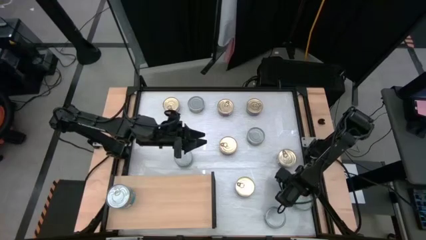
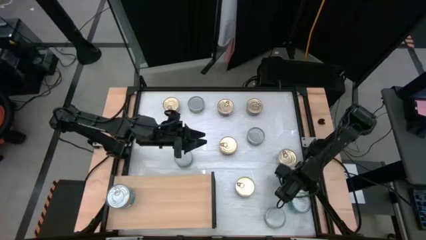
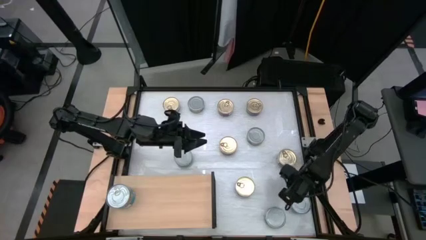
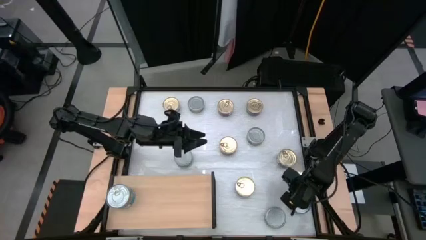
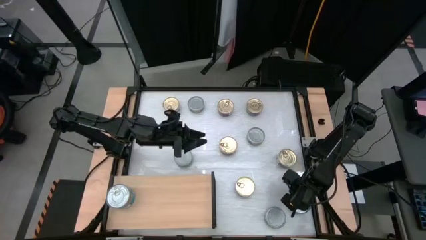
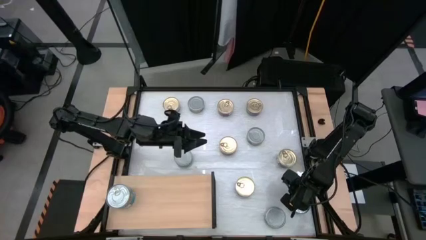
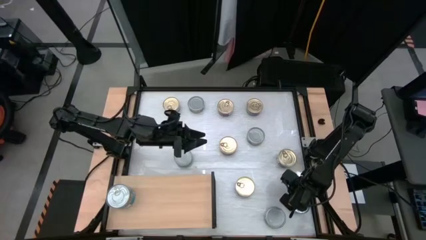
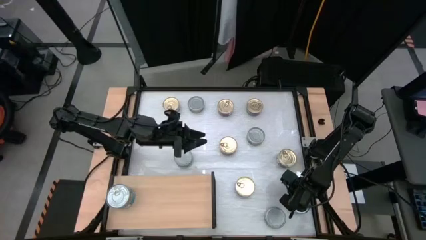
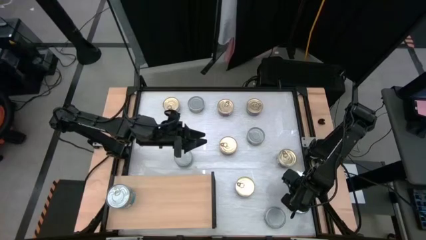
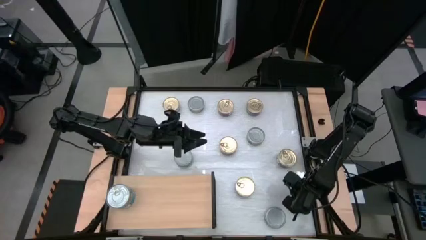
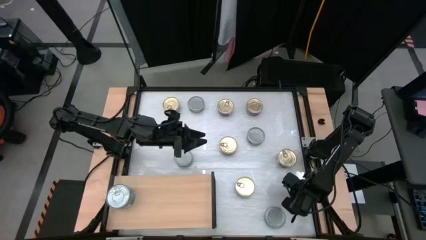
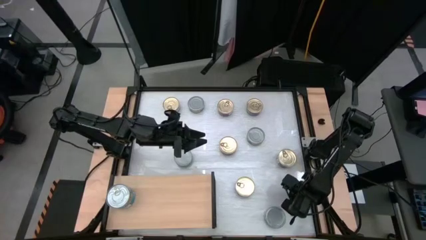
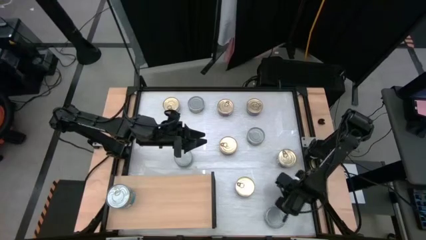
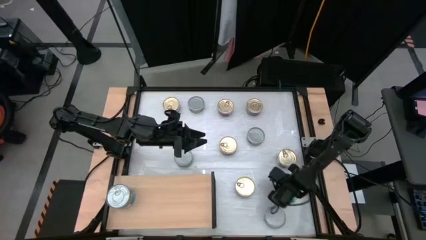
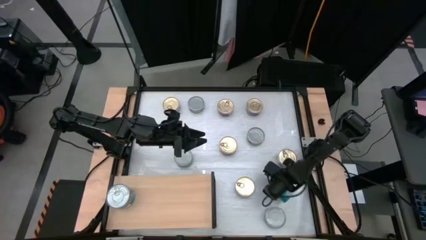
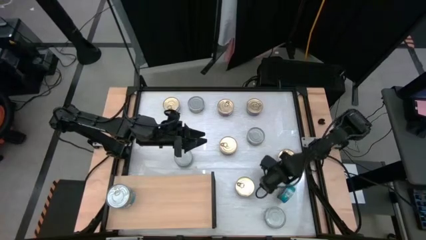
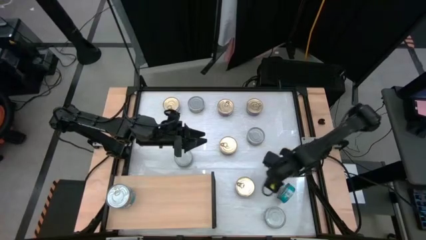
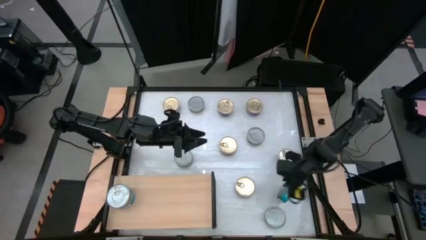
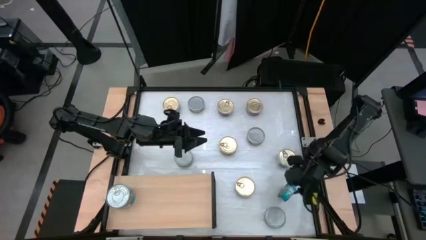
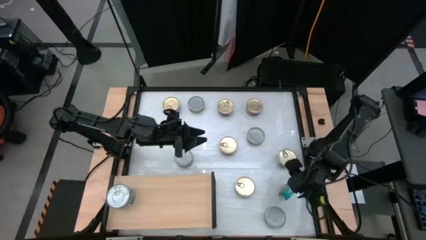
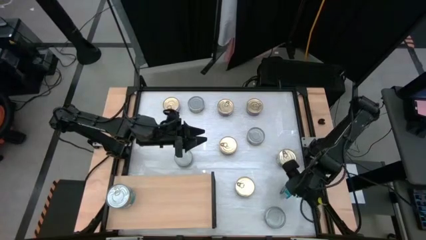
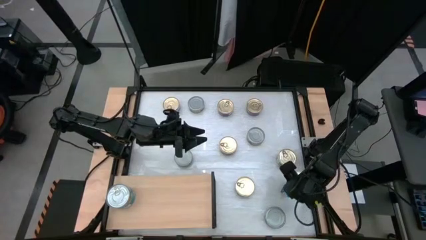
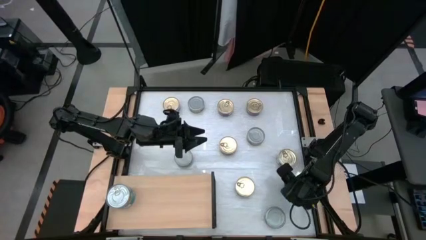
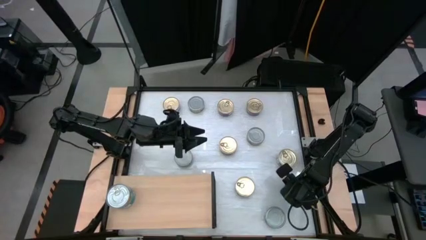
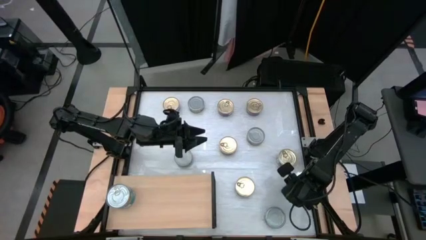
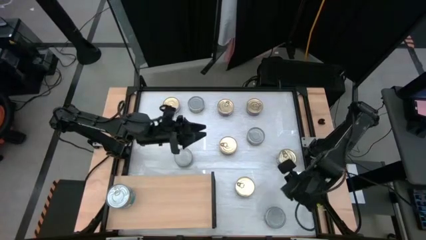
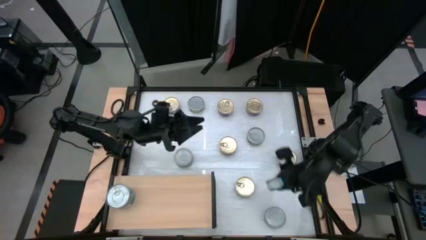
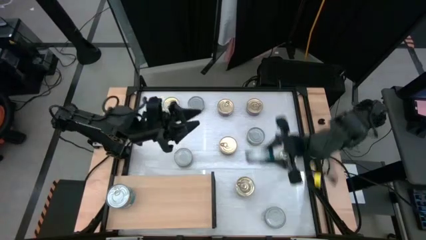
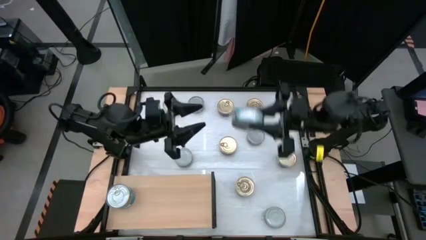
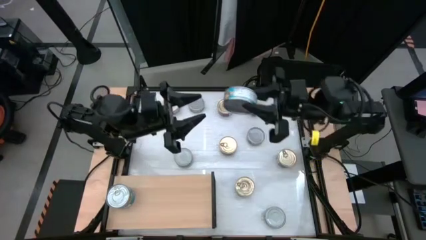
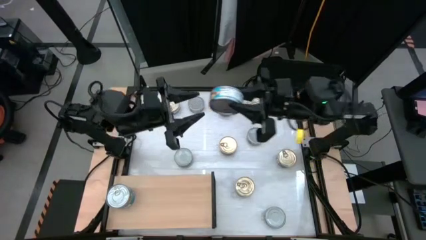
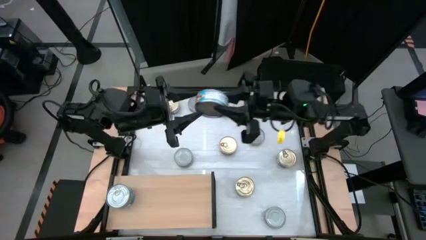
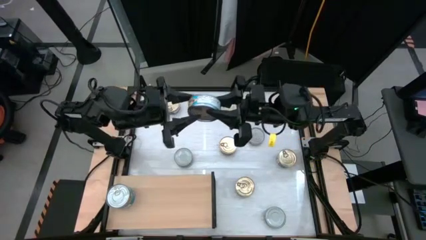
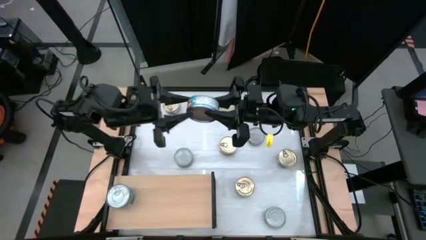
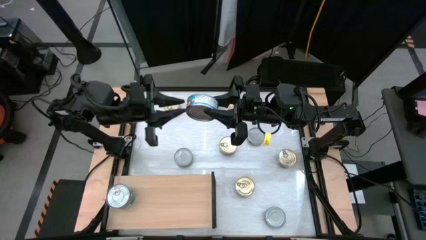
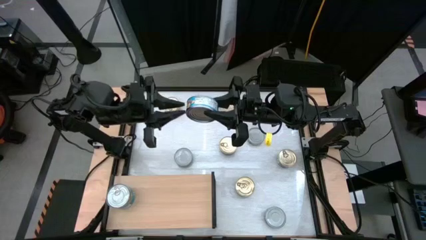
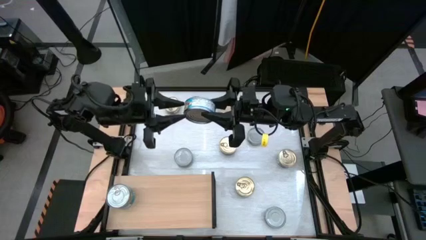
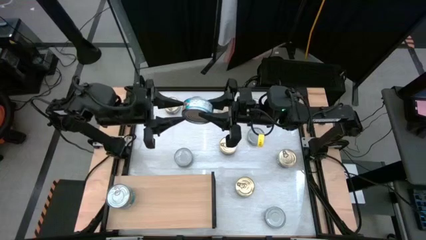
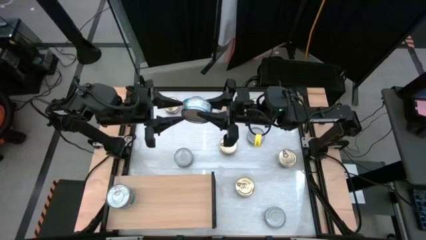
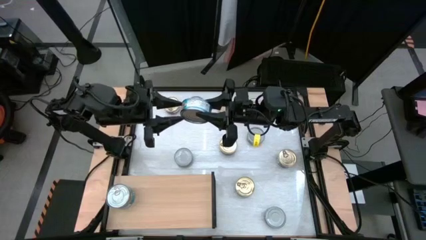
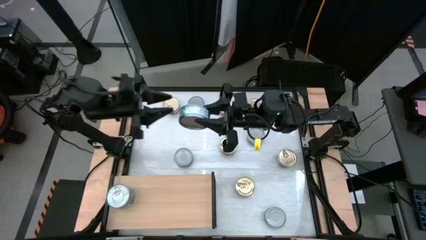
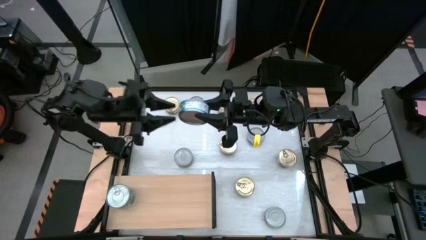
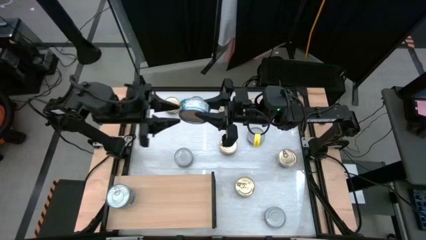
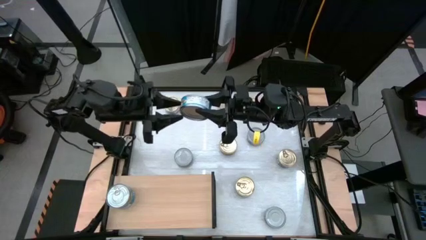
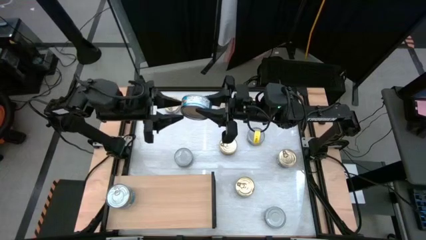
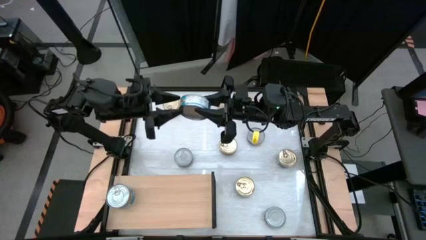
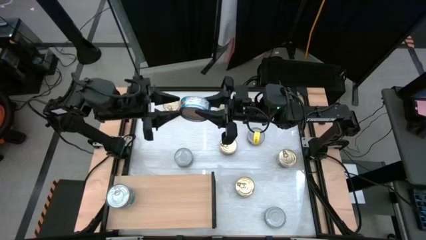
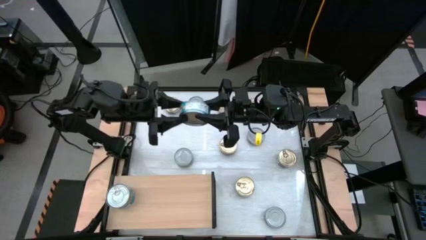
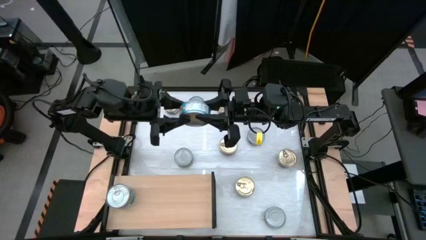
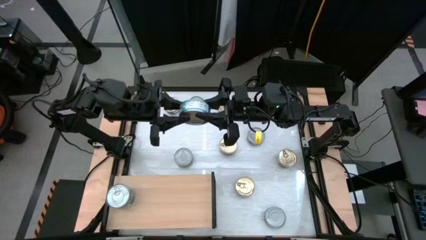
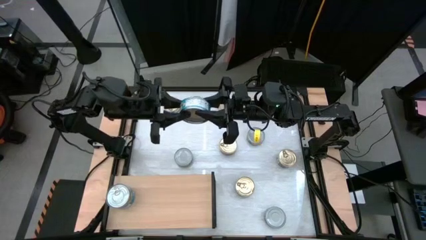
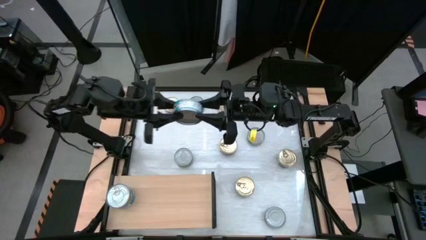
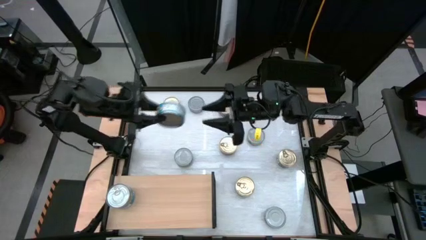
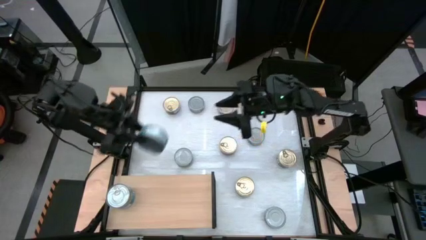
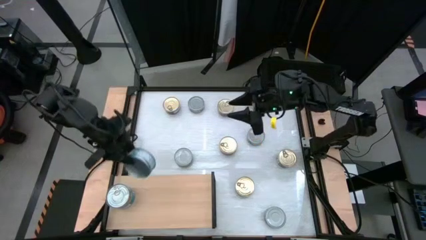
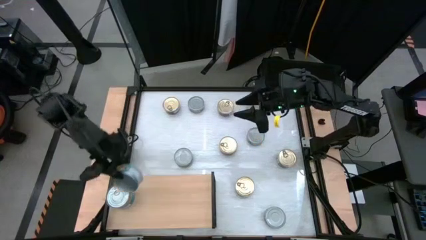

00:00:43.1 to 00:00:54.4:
Task: Stack canned seafood by type on shelf
Stack the yellow blue tuna can on top of the yellow blue tuna can on the shelf

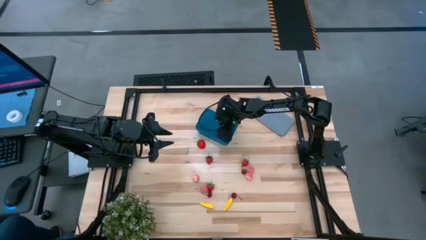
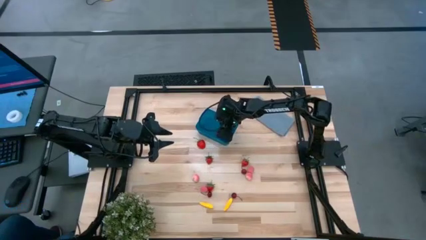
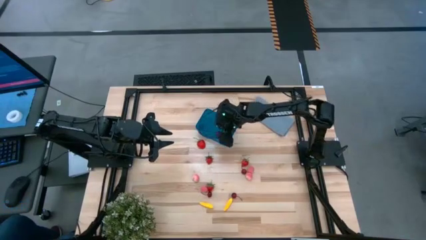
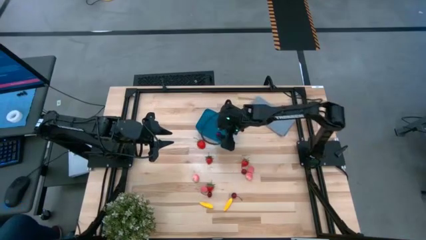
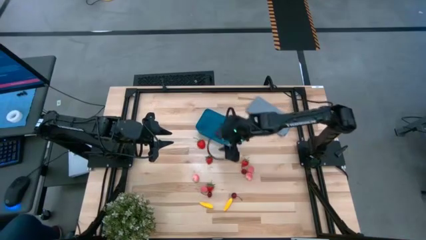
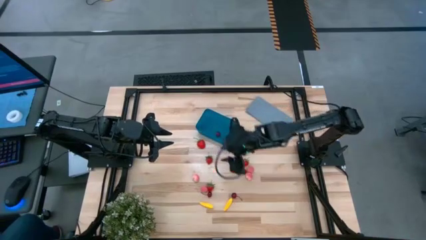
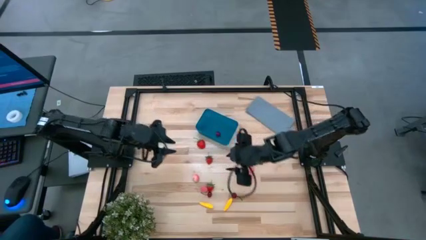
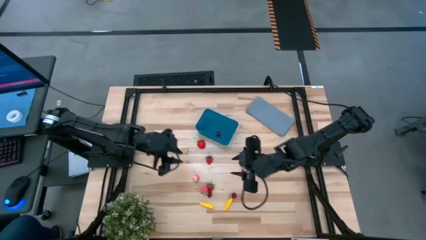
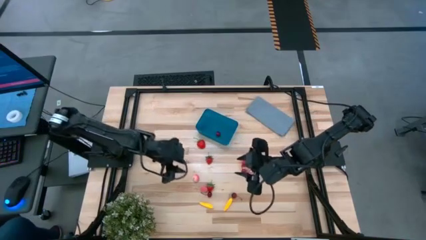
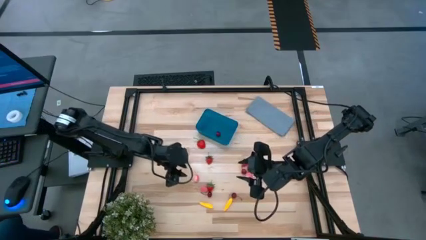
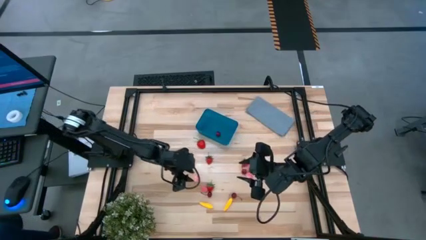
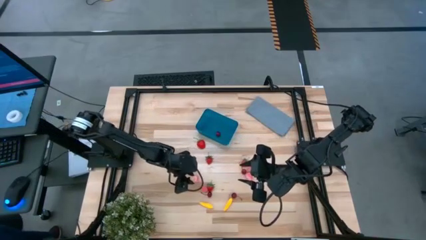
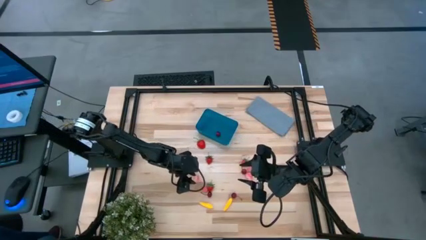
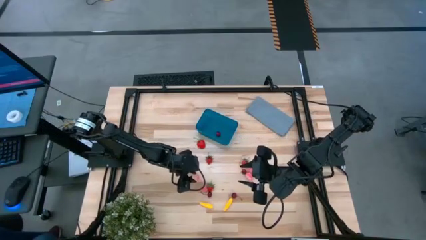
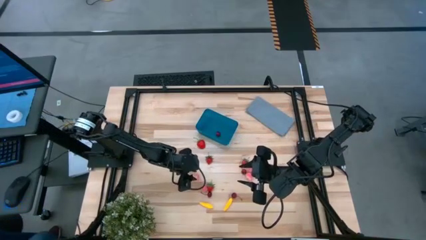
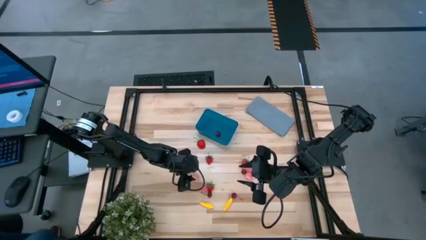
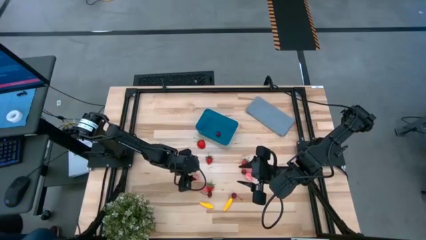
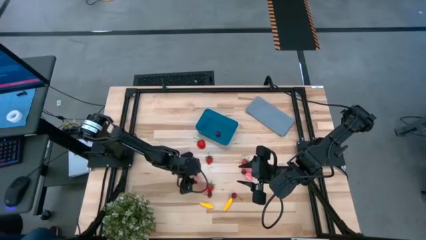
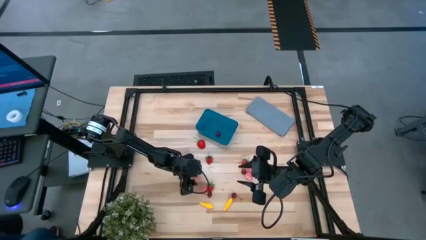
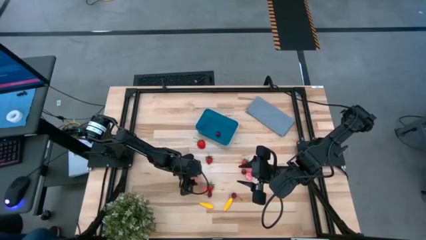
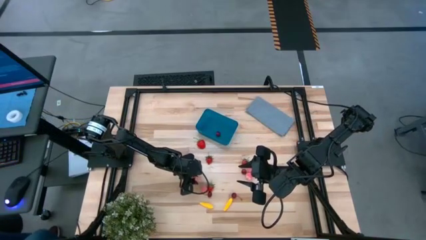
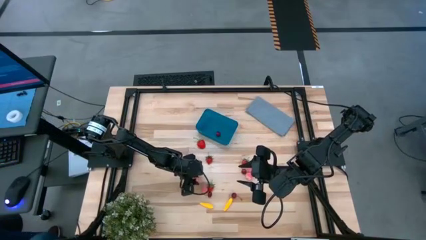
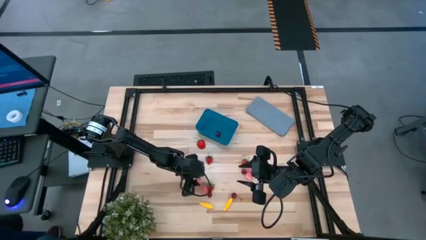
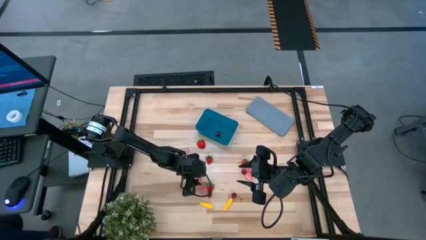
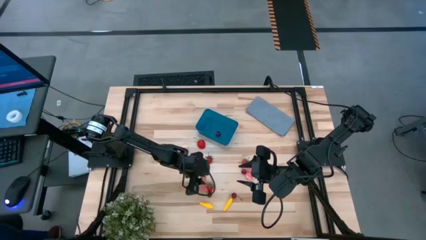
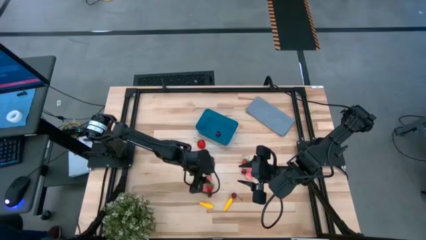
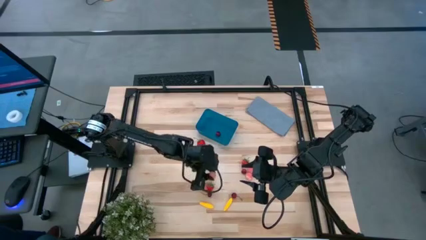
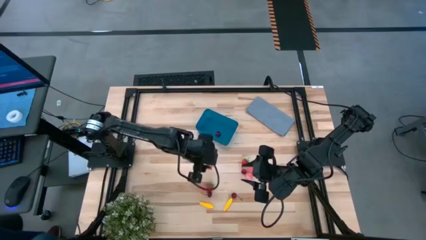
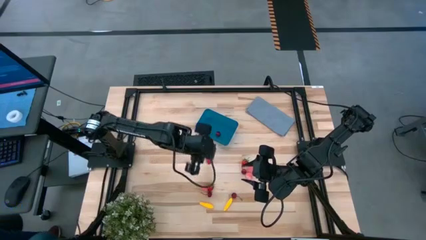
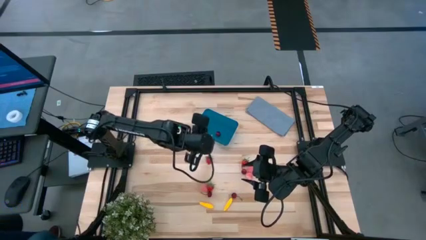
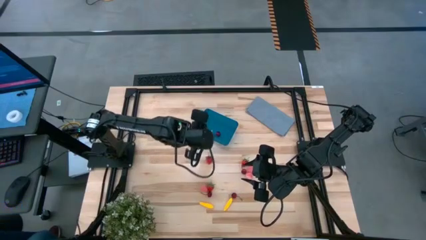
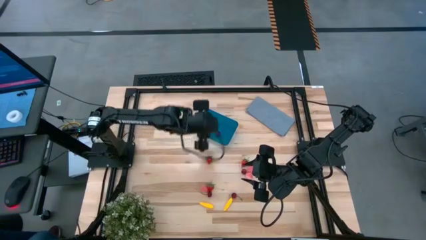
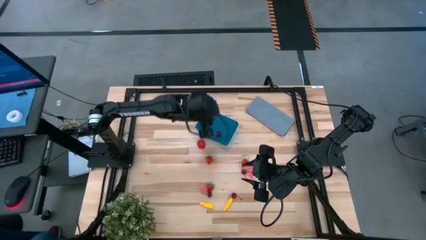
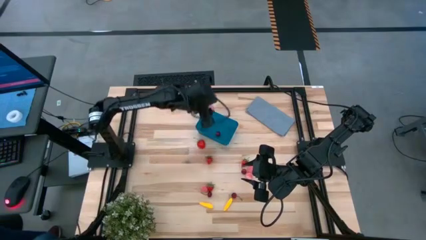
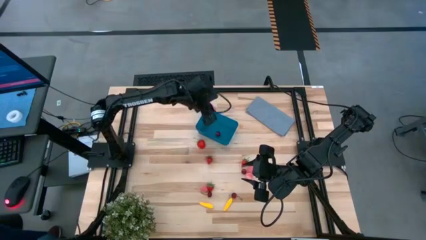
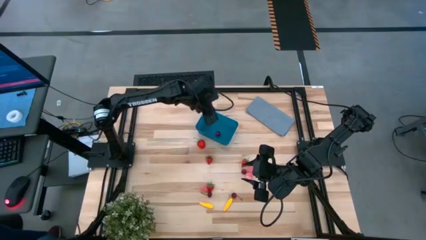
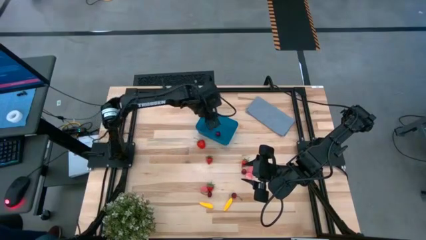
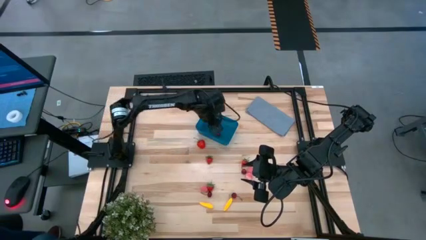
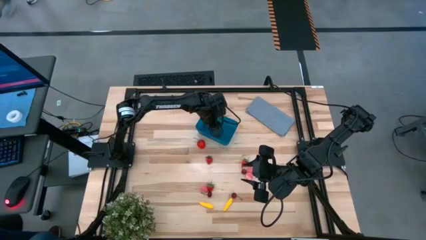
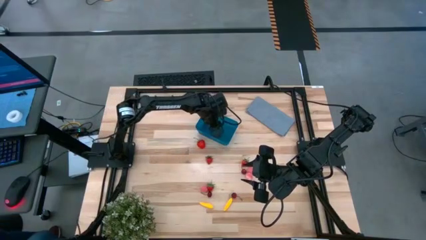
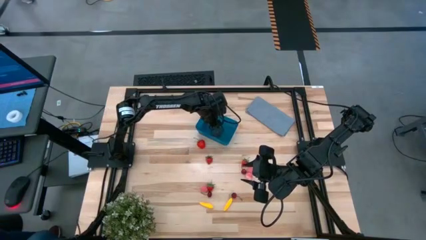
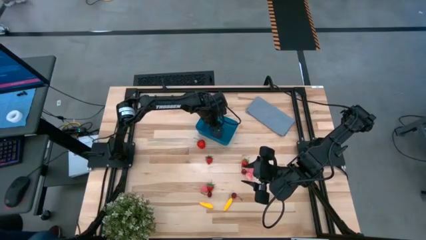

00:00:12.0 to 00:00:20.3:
Task: Pick and placing Produce into tupperware
Put the peach into the blue bin
